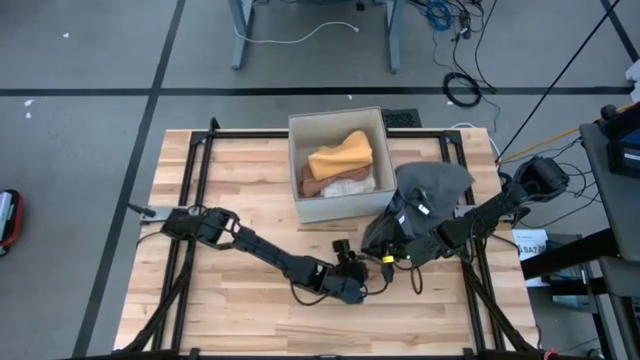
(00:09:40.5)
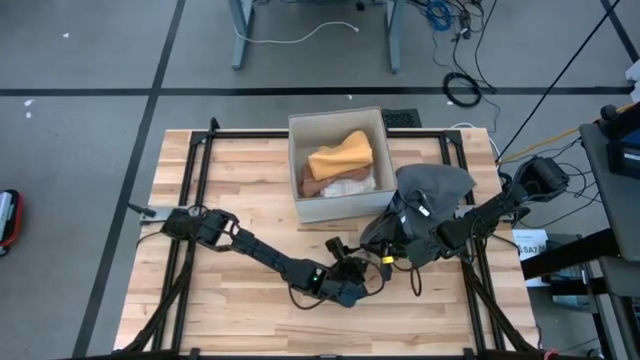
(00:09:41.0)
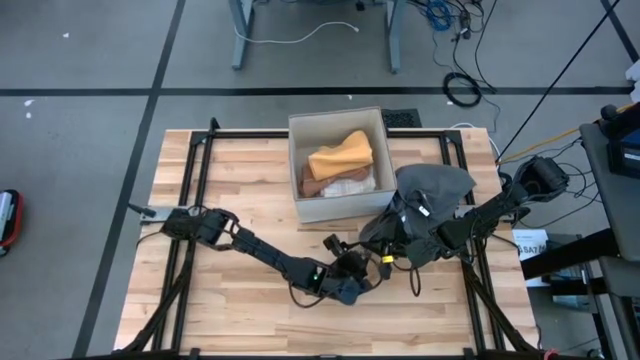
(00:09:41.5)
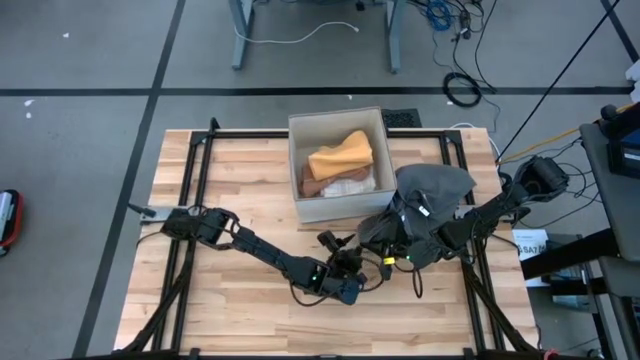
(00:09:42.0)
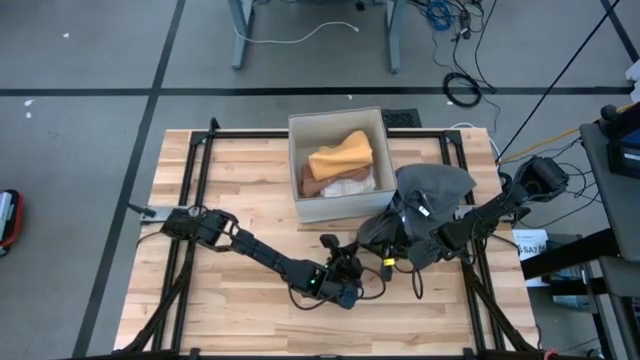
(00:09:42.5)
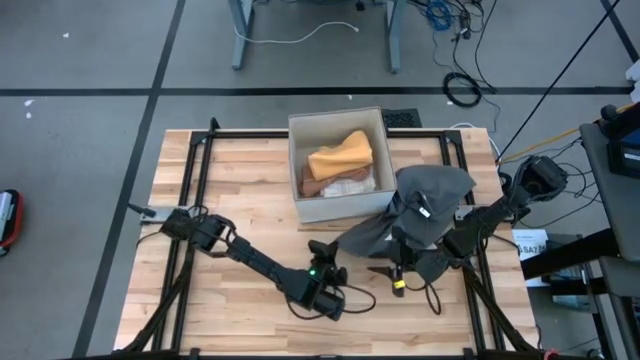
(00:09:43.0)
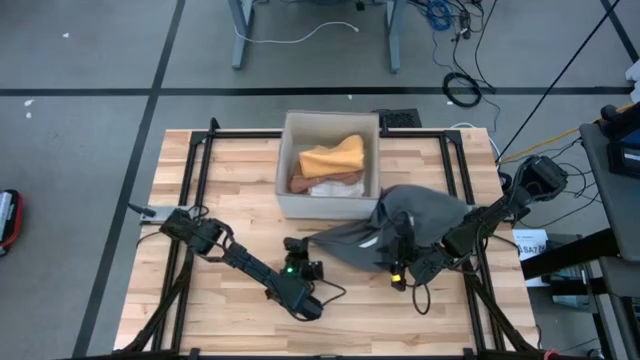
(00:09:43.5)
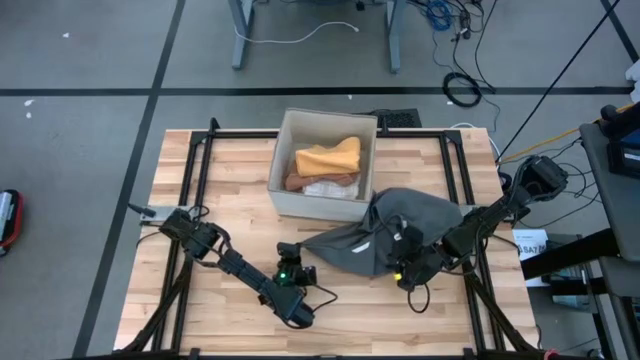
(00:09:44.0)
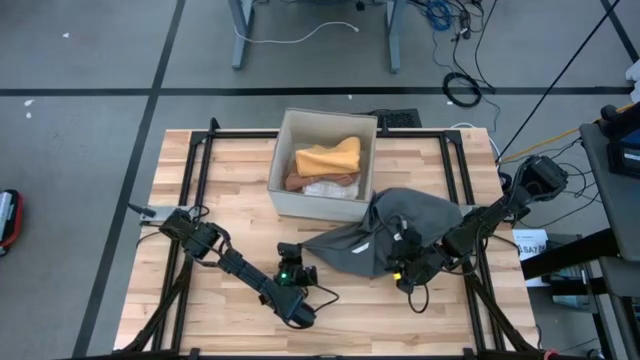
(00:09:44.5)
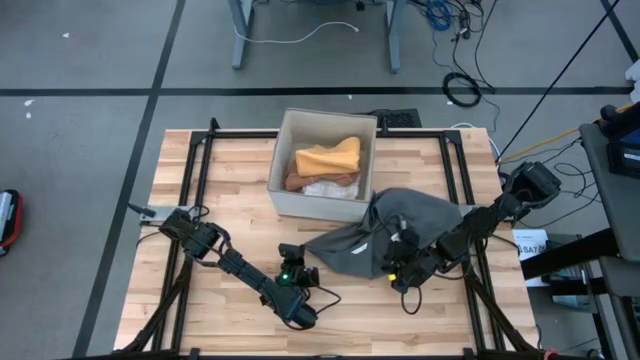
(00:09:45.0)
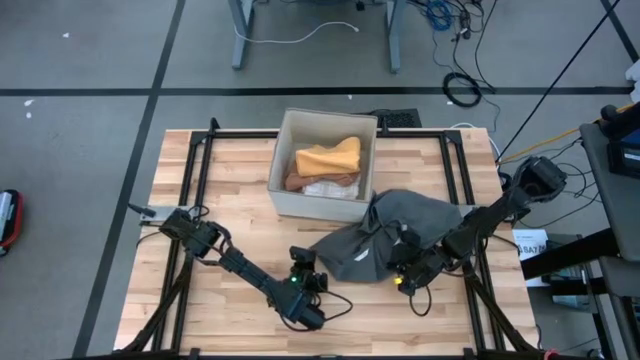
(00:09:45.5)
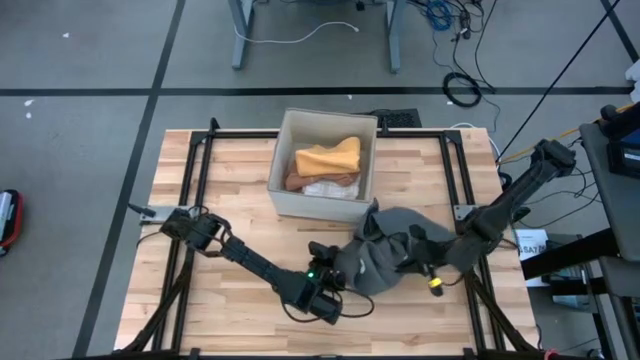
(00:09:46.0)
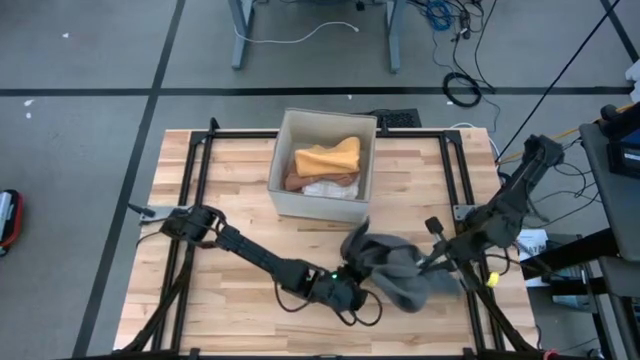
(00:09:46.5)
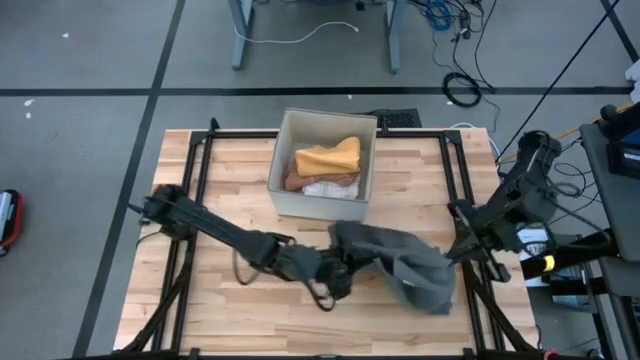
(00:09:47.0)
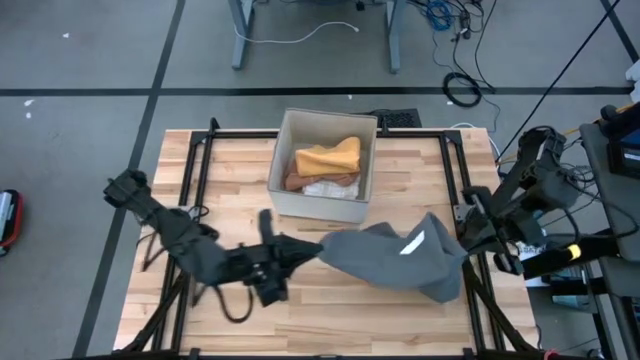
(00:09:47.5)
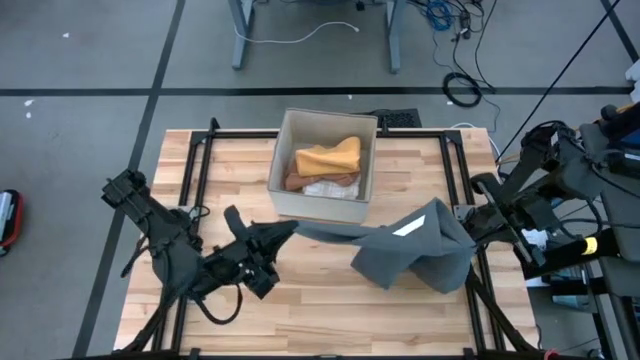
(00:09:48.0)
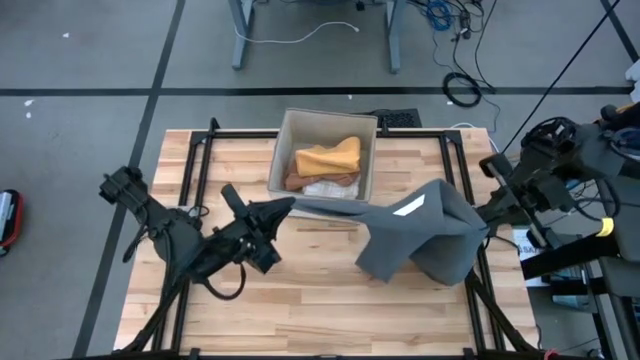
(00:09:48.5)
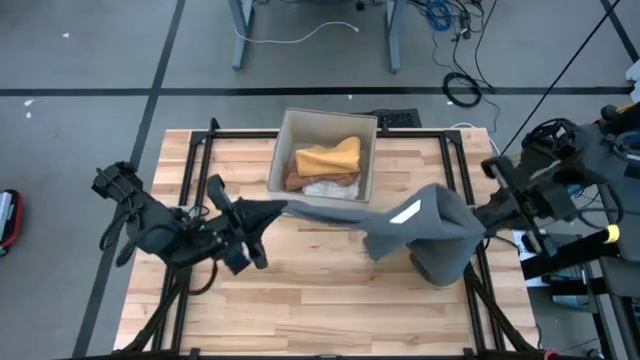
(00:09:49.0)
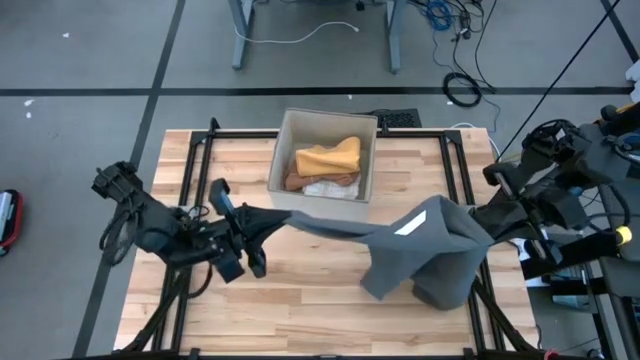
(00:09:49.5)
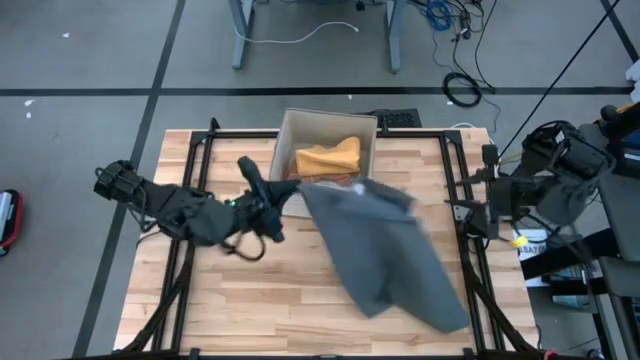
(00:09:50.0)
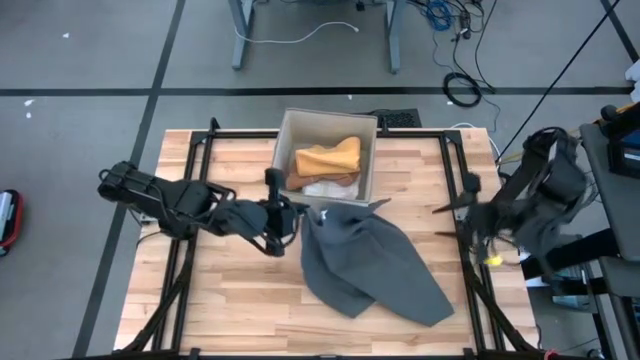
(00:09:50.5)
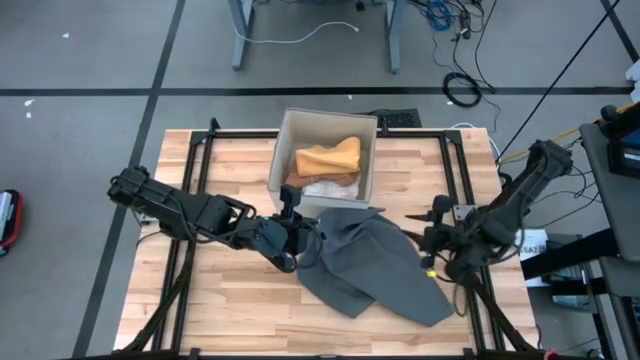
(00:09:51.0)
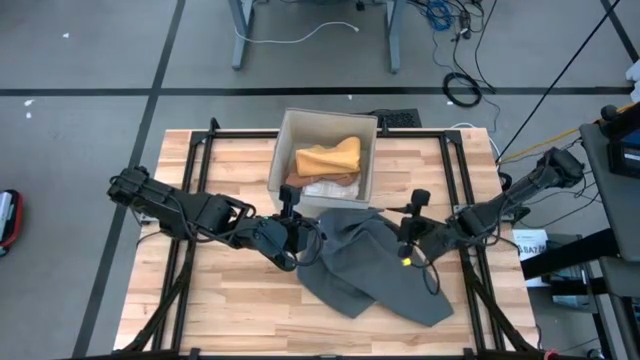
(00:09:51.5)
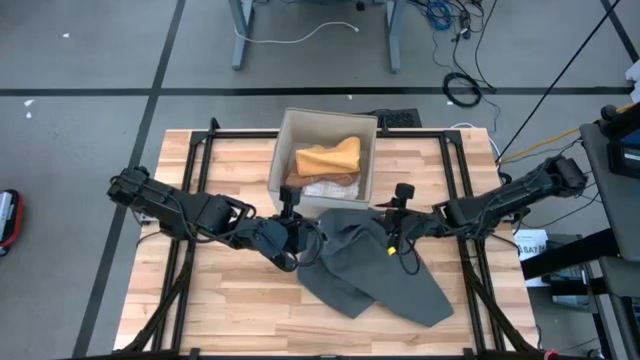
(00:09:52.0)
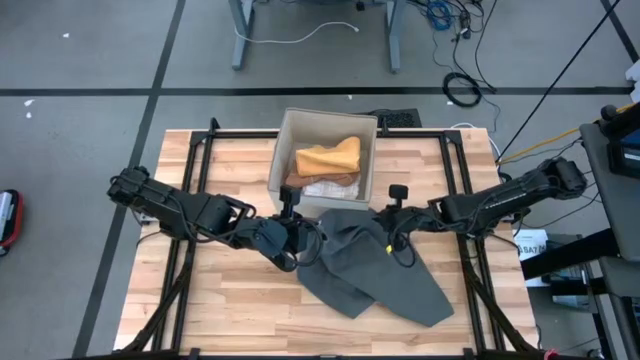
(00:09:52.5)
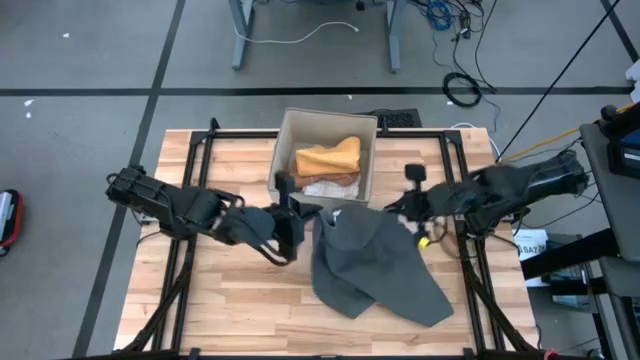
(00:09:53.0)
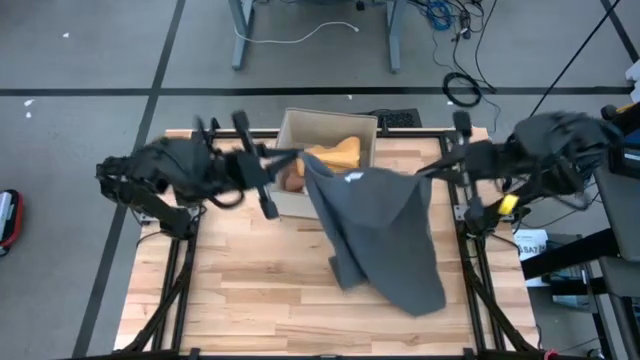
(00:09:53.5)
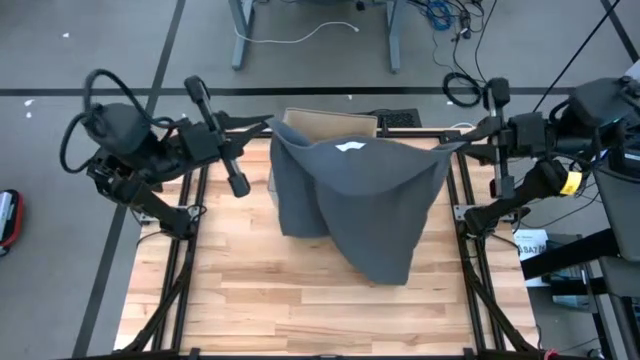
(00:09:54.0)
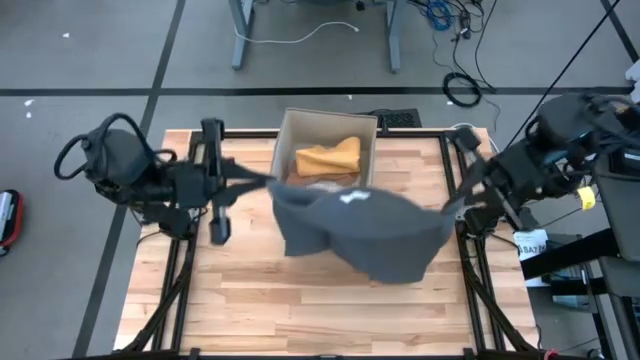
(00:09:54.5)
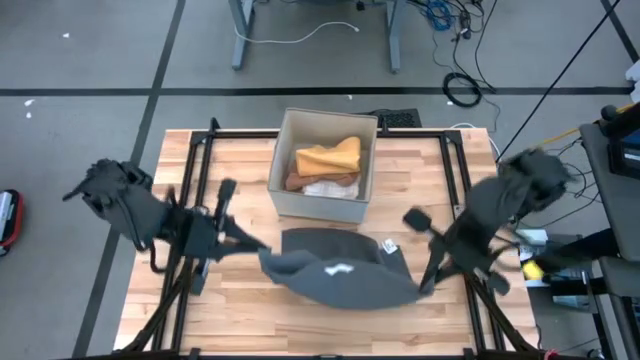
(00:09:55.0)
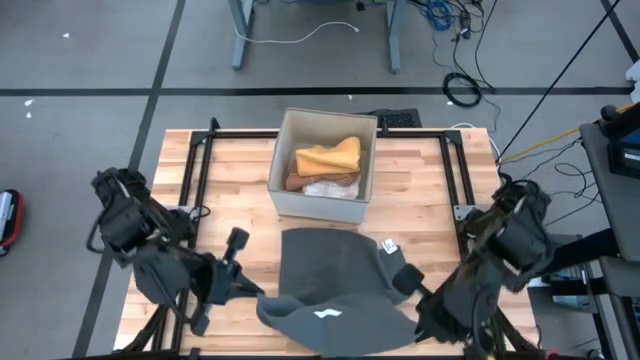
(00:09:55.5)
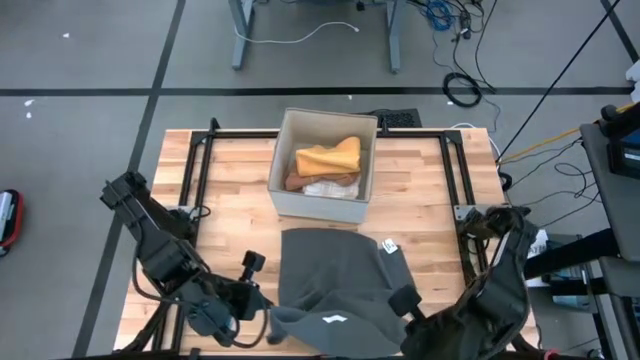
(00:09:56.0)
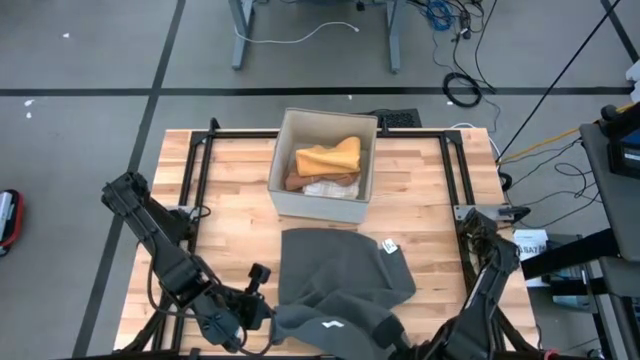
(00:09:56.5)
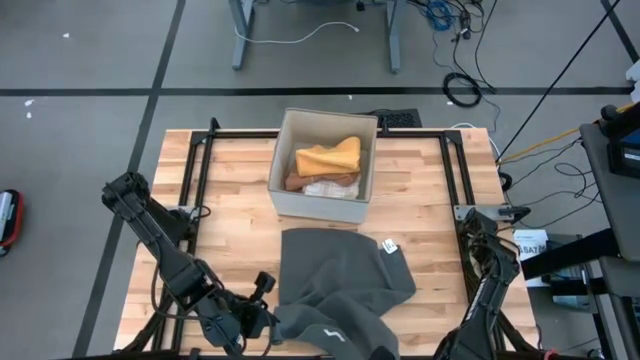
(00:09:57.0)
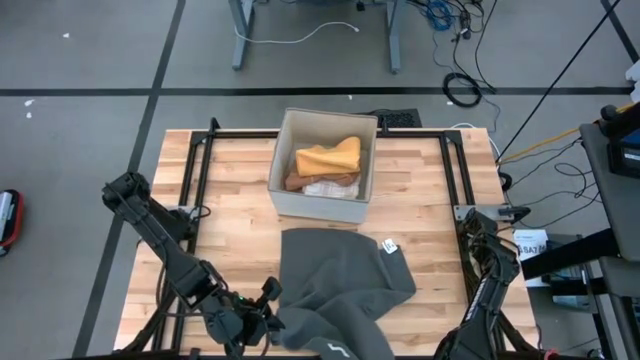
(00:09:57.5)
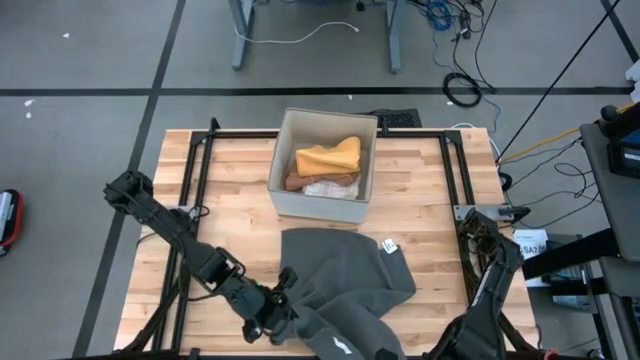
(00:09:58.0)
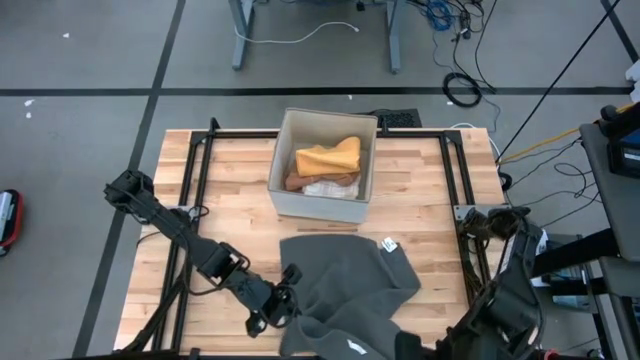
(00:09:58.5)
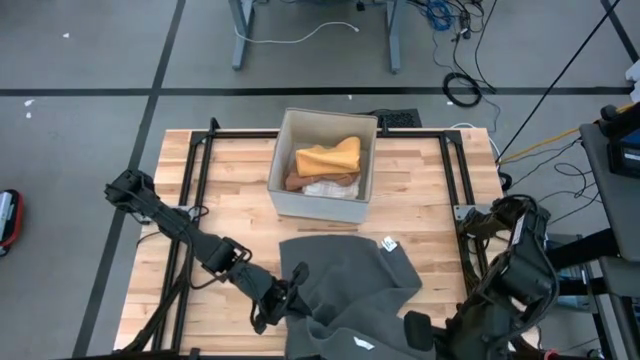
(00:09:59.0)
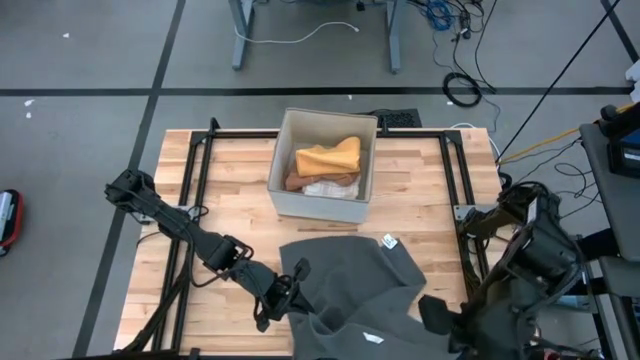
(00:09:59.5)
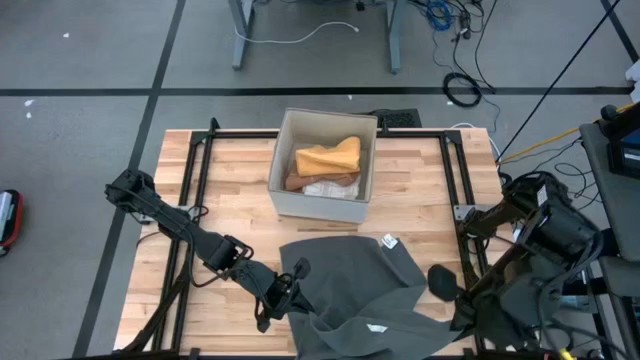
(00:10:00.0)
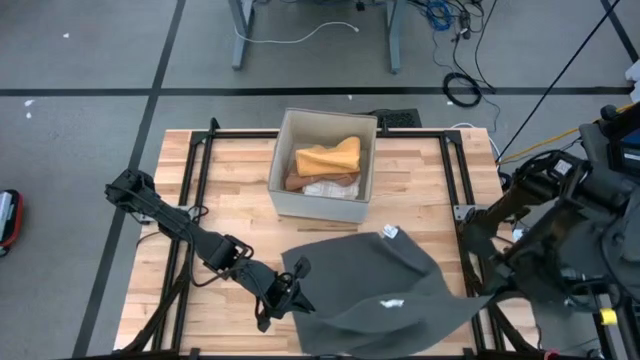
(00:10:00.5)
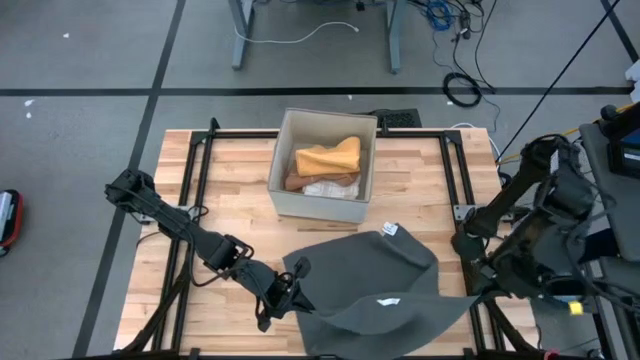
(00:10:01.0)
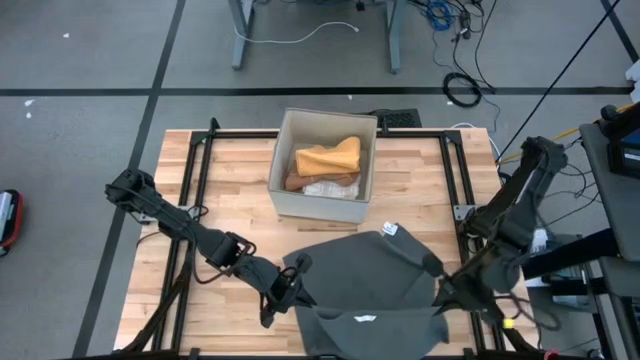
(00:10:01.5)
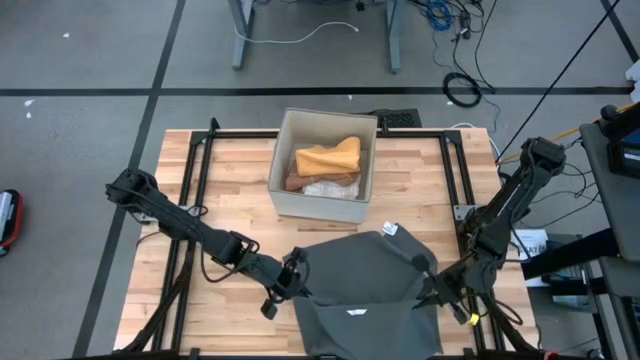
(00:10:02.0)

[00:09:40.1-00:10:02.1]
Task: Fold towel
Fold the orange towel
